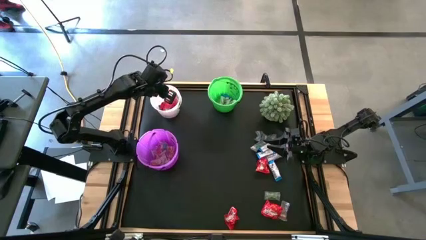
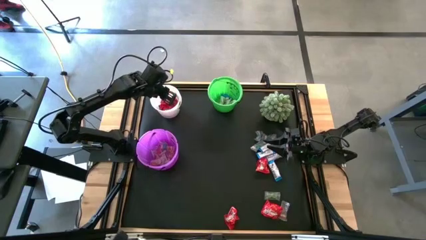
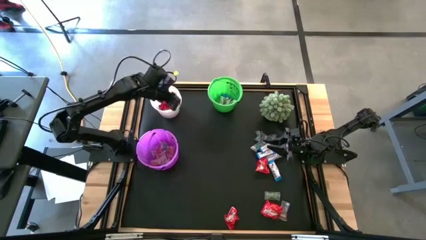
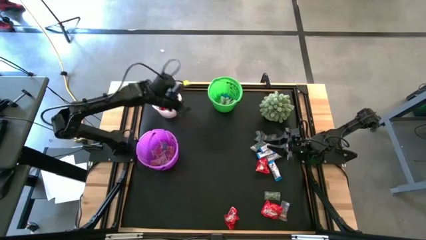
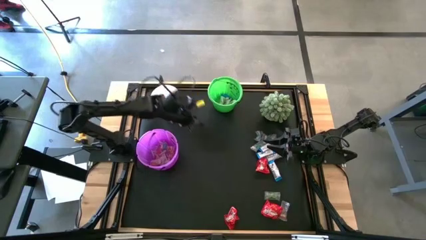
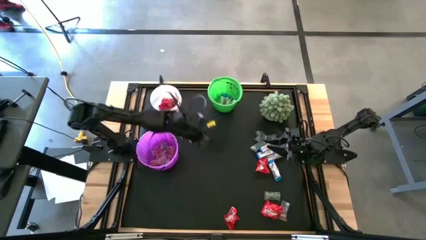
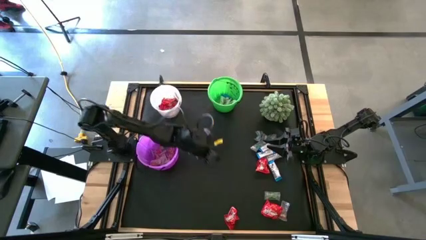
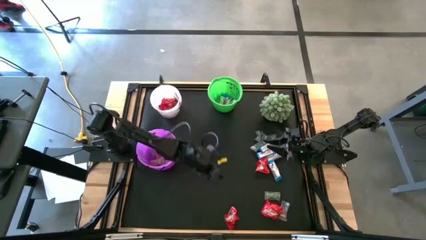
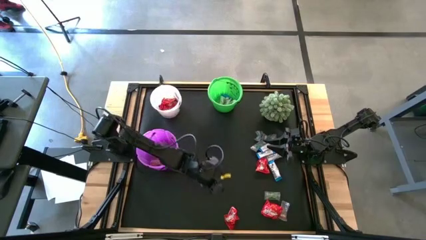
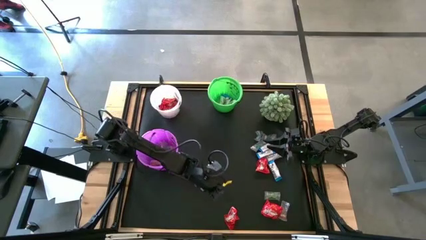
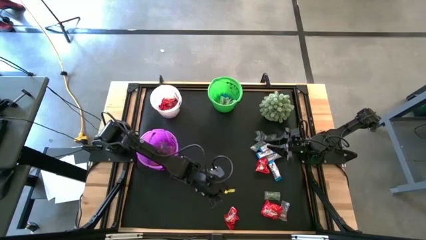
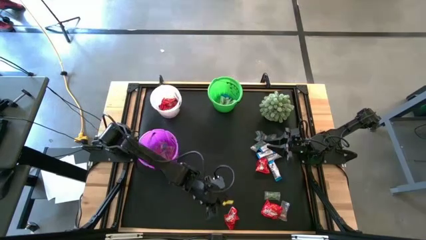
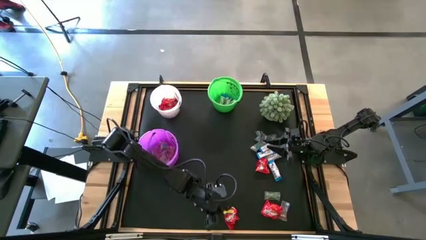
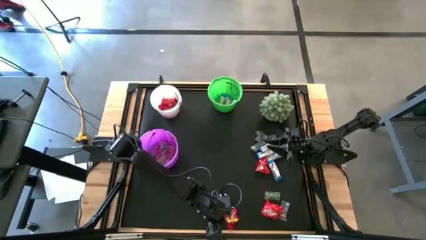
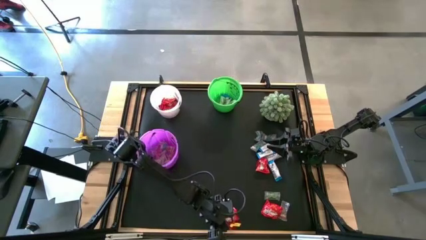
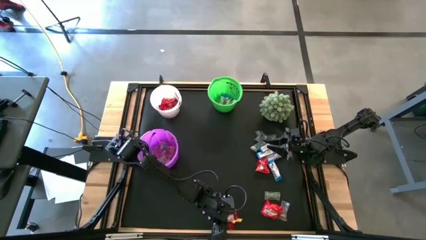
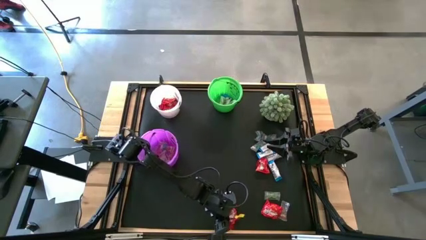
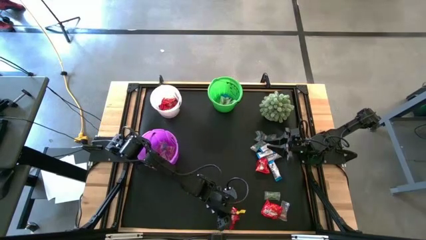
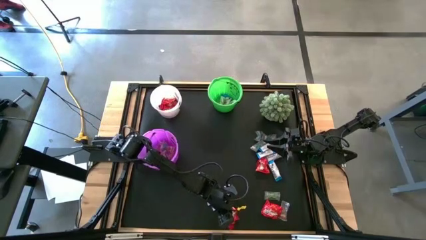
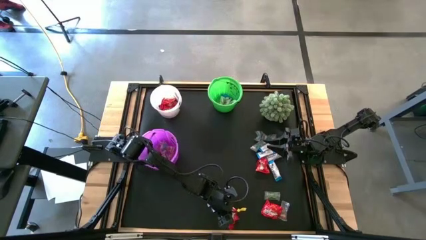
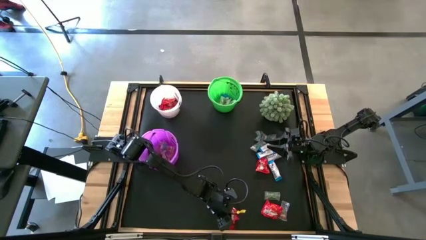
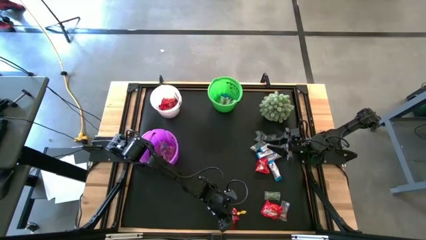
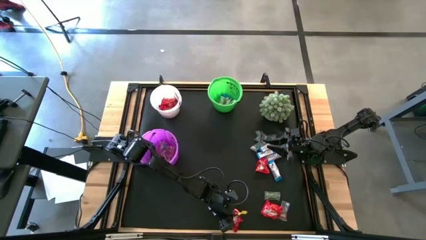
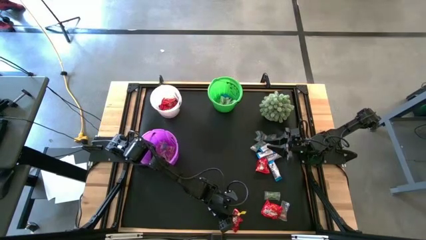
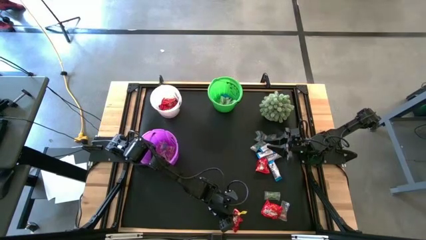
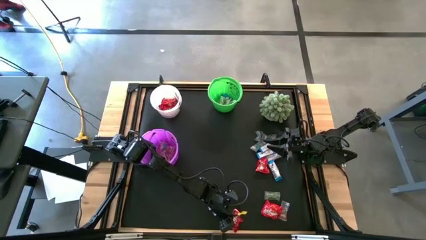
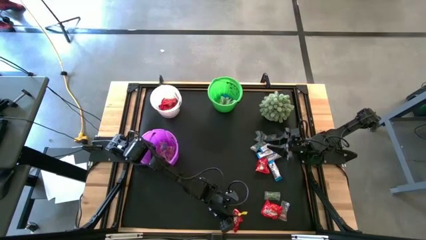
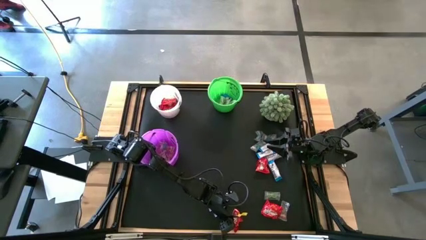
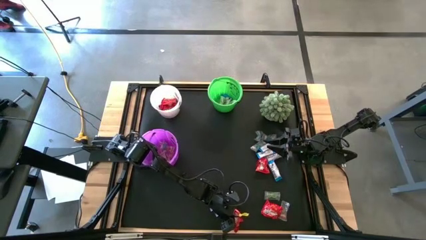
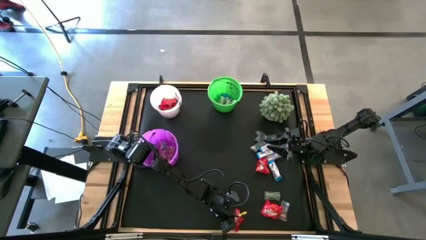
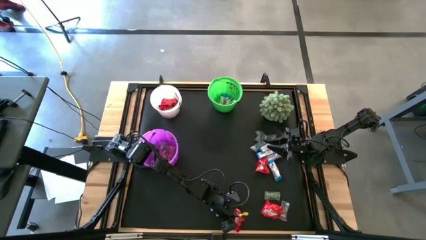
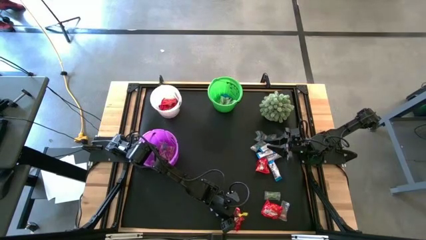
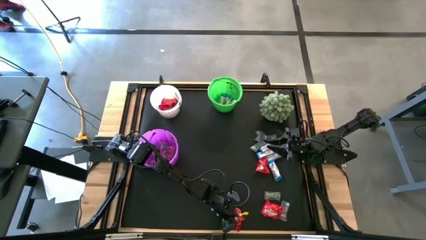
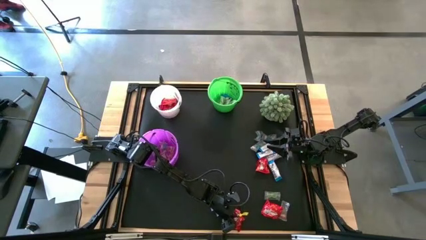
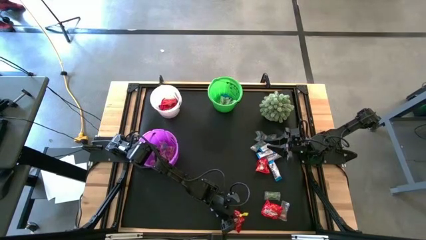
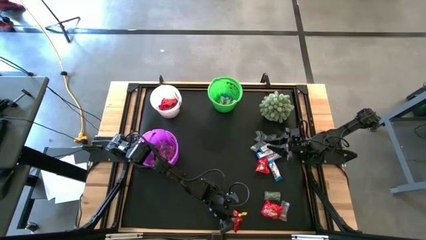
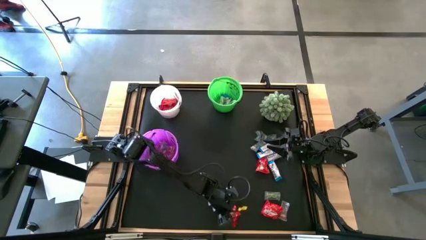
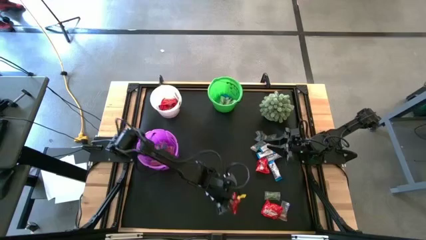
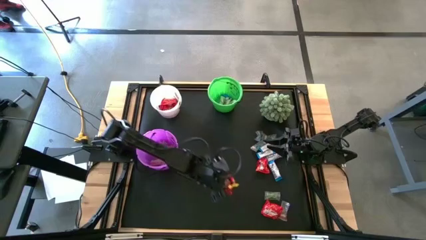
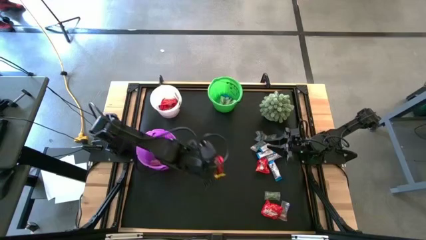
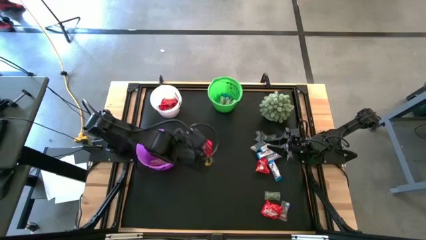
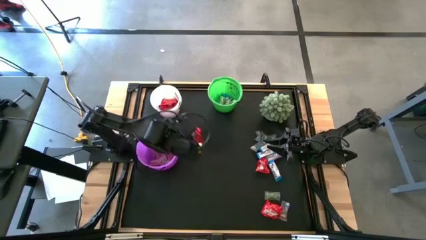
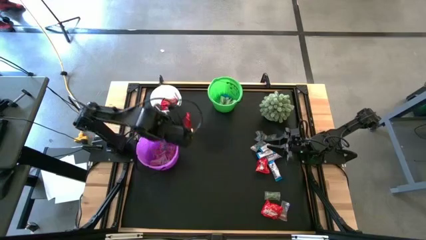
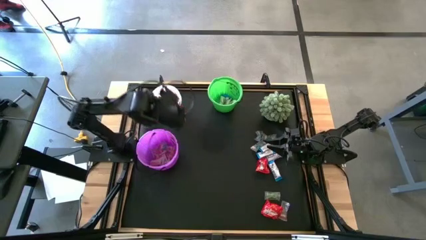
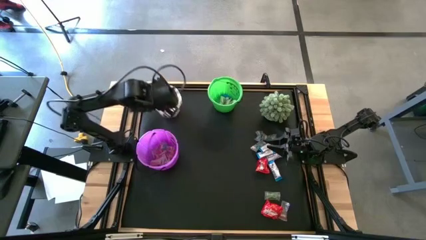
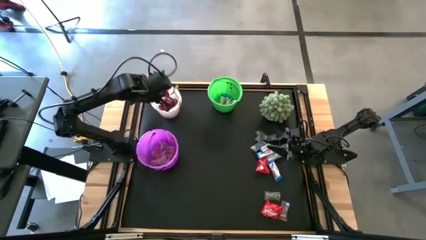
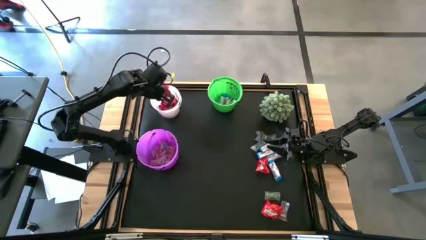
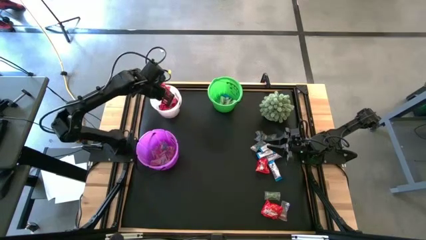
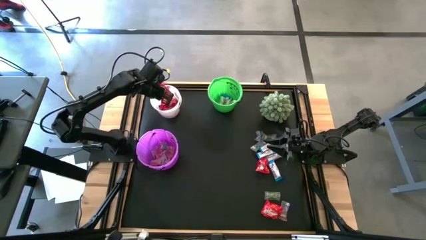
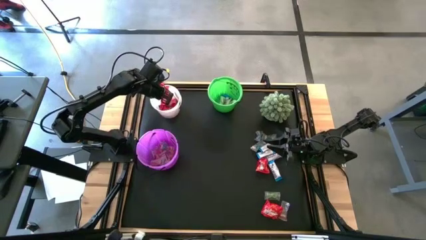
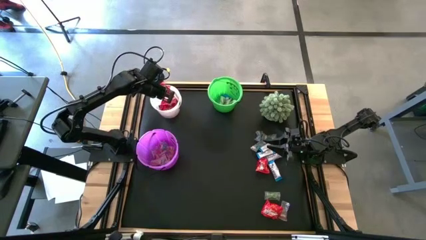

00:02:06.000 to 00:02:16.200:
Task: Sort candy
Put the red candy into the white bucket

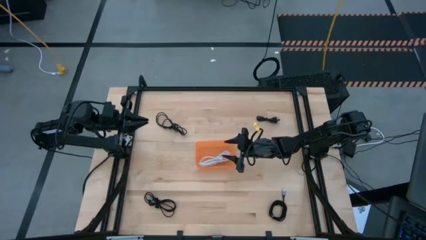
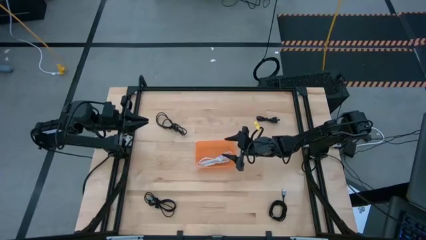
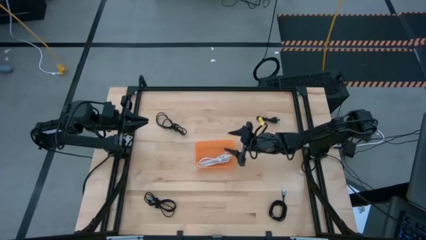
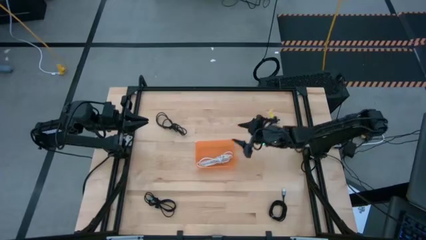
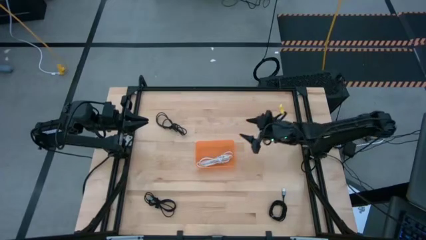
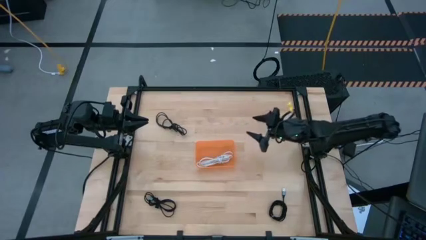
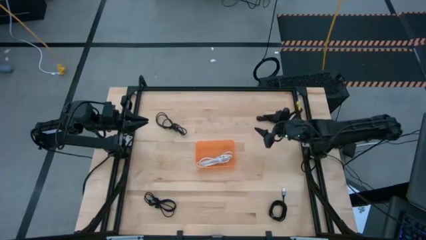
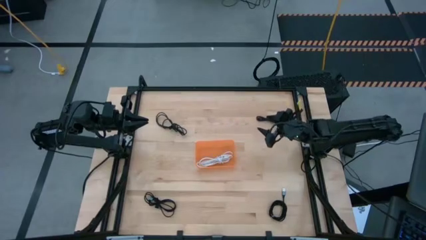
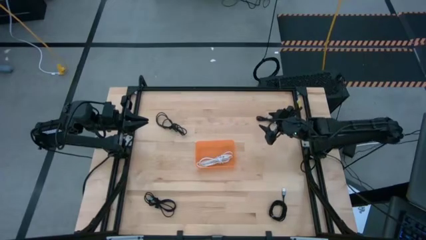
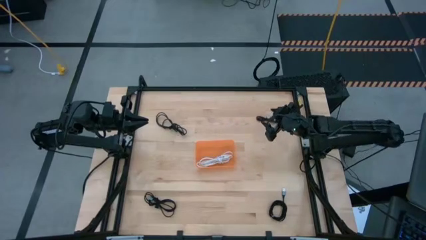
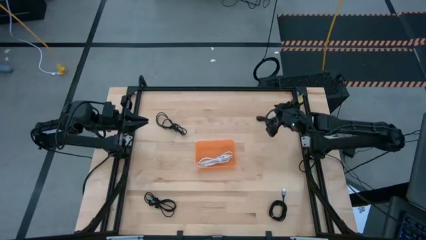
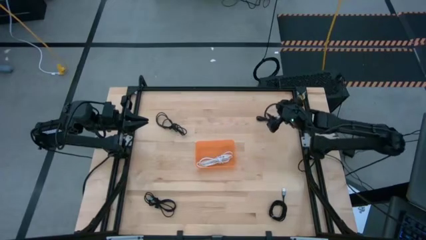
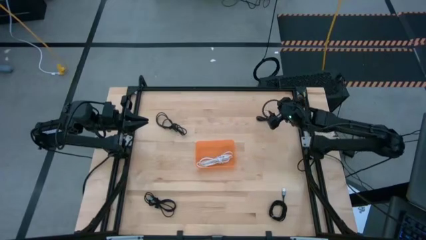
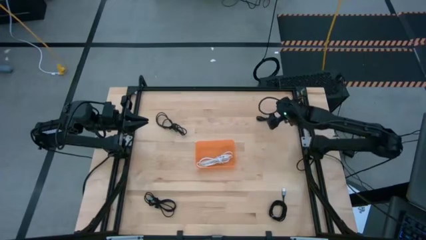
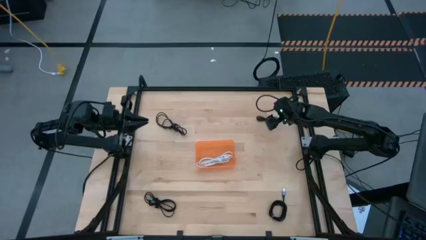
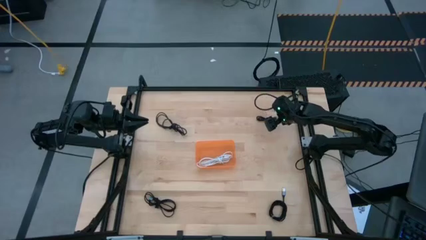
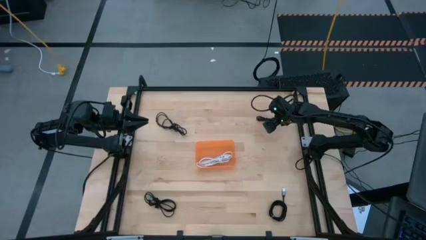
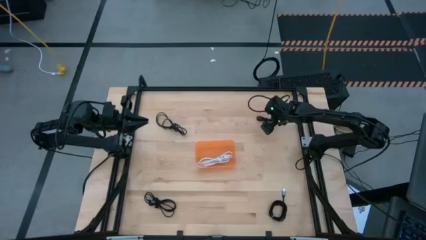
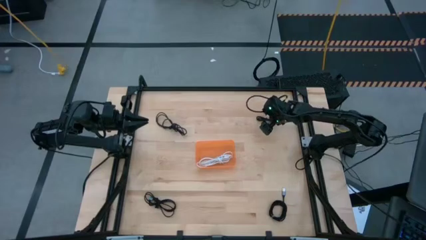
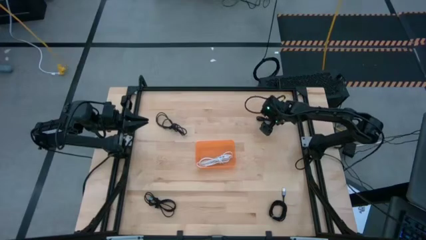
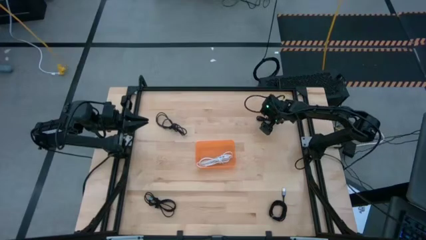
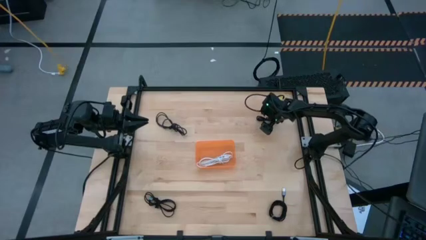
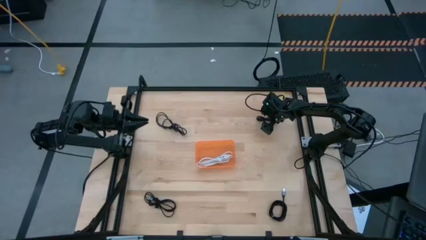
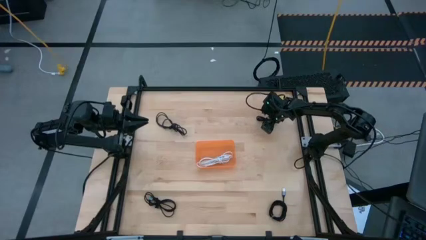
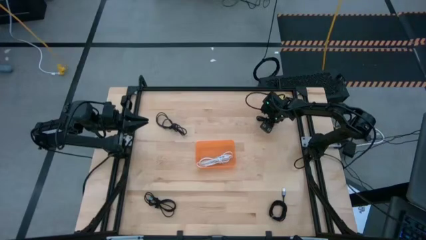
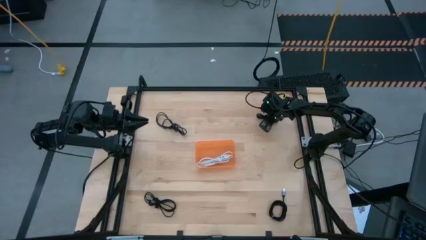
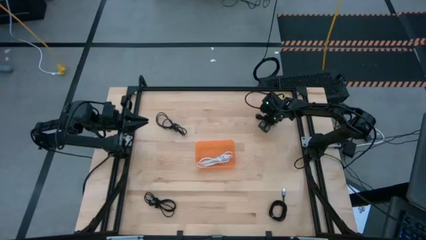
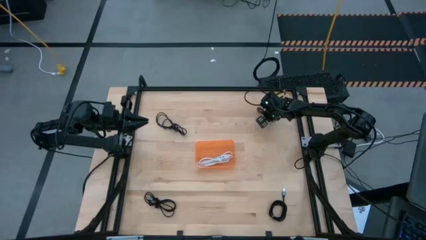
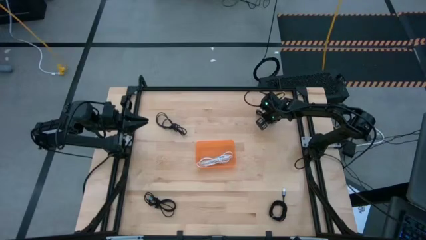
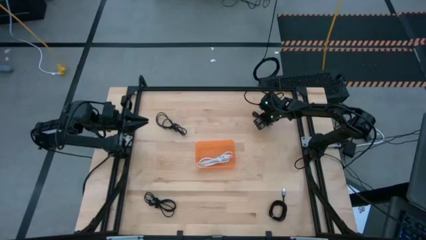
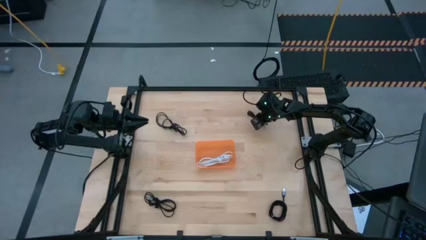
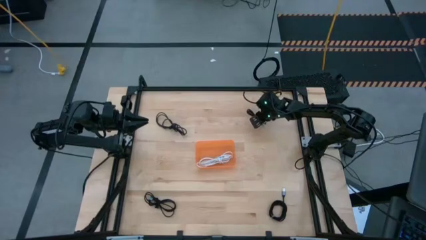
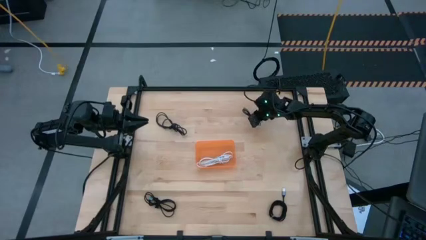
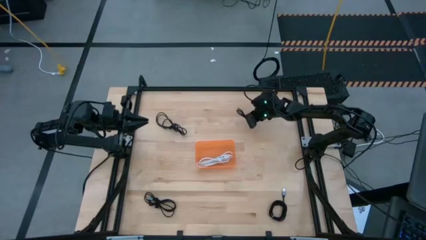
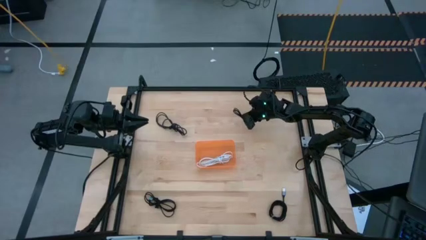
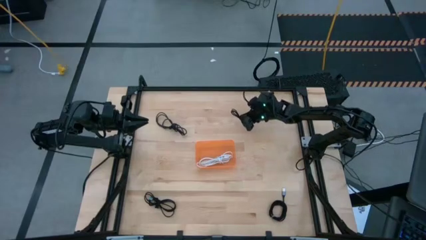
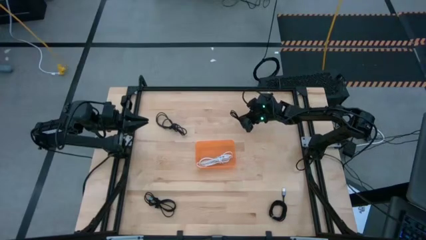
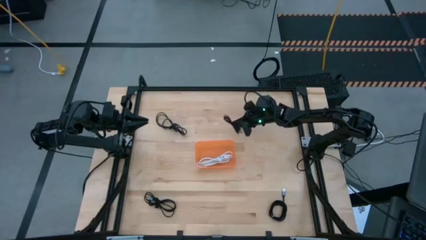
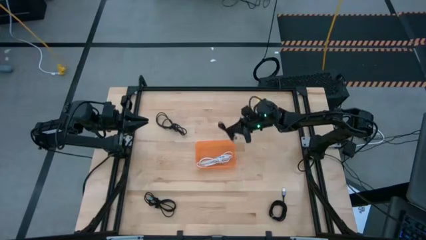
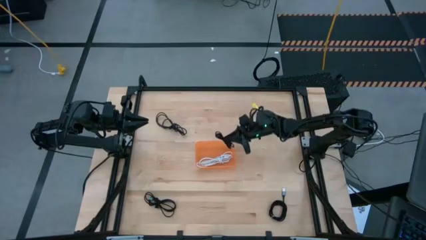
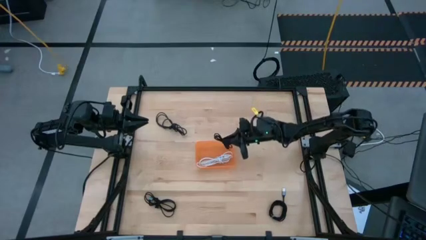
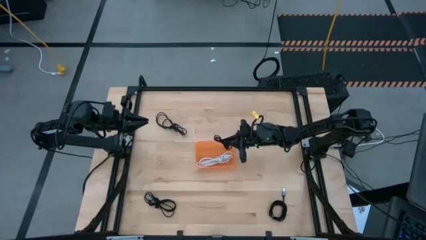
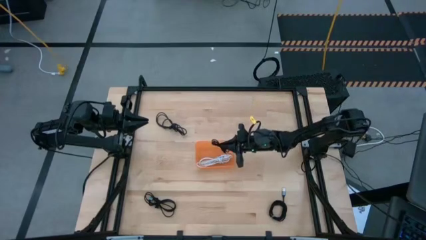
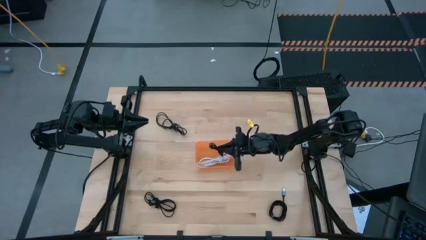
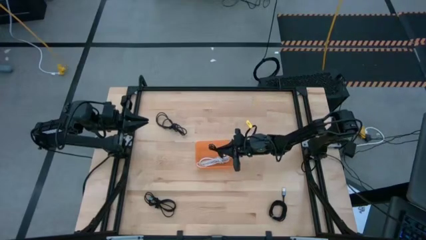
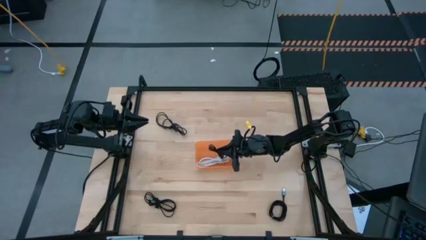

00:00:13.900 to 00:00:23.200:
Task: Pick and place USB-C Cables
Put the black charger cable into the orange bin
